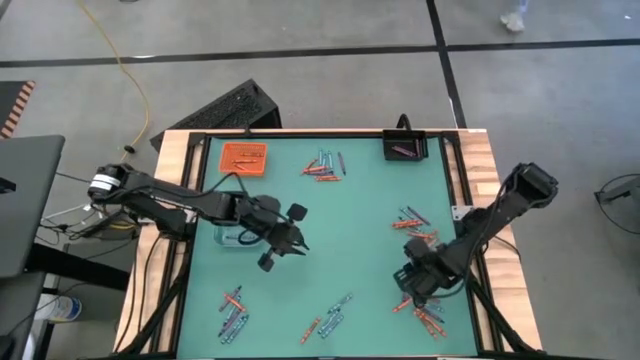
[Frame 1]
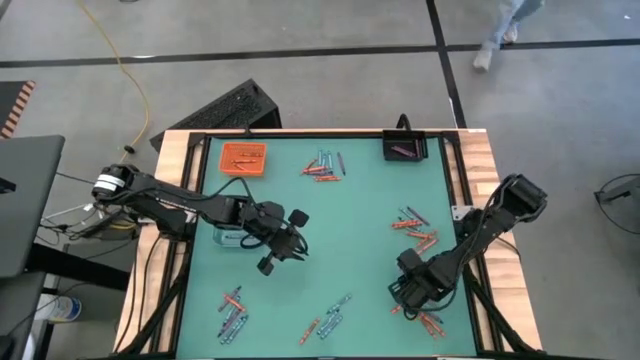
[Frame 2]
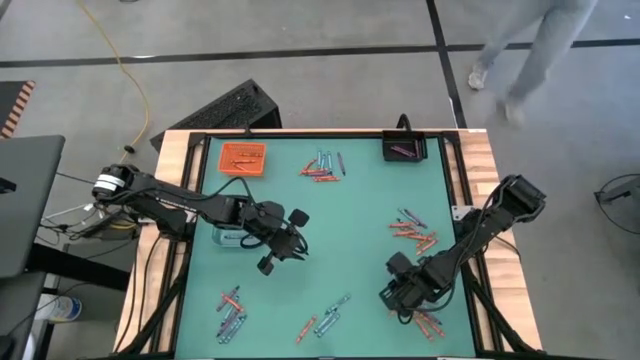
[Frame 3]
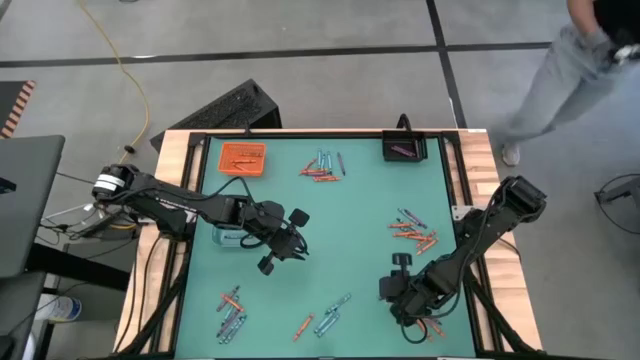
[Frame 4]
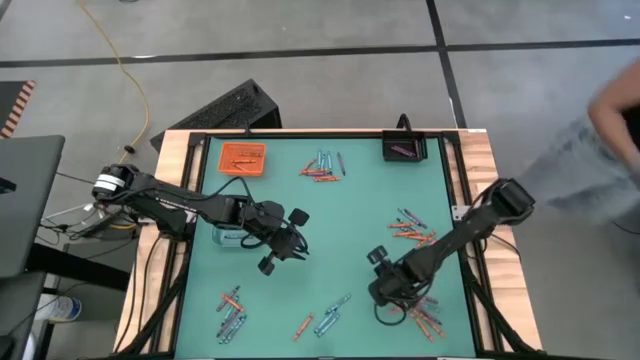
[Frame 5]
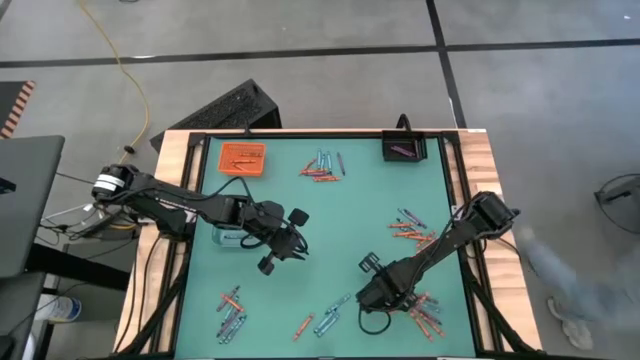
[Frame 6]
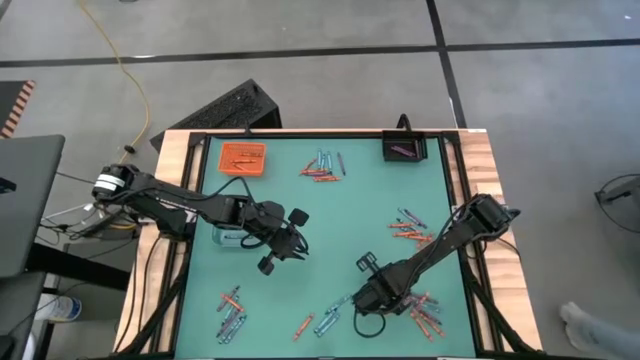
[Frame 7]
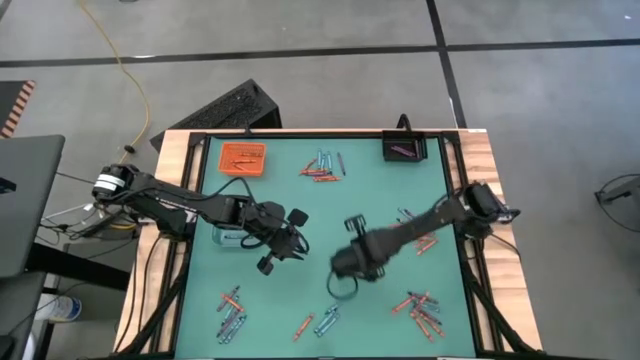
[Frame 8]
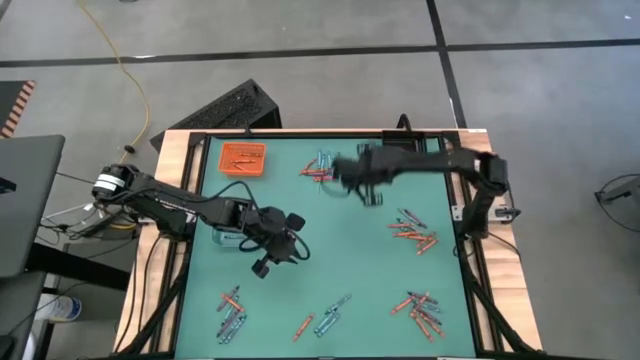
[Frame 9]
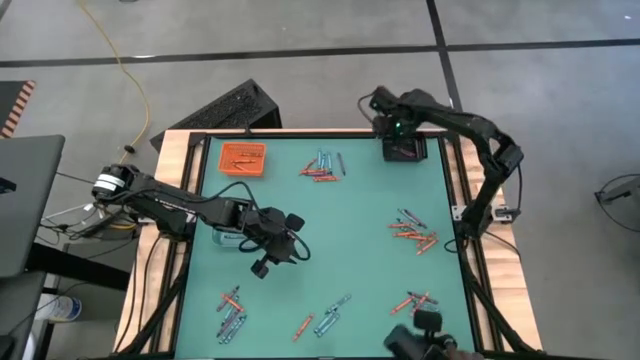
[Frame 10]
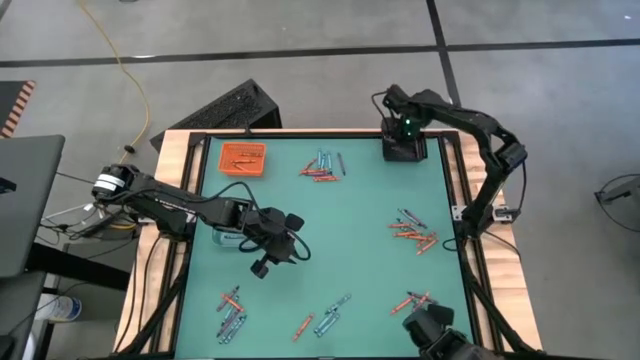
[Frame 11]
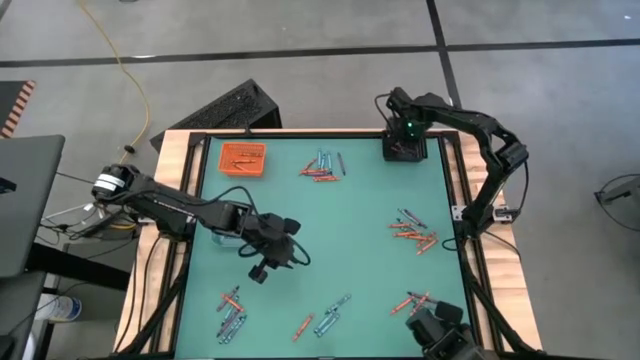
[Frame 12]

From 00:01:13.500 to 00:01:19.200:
Task: Sort crayons
Put the purple crayon into the black basket

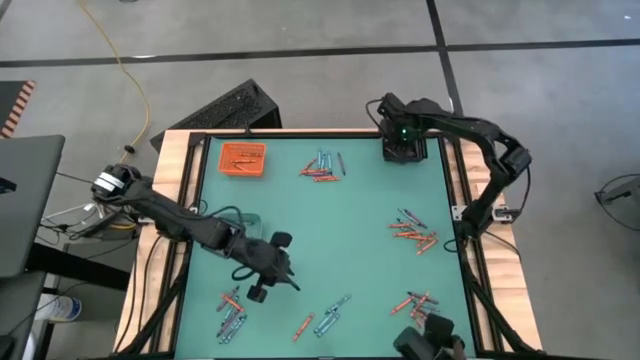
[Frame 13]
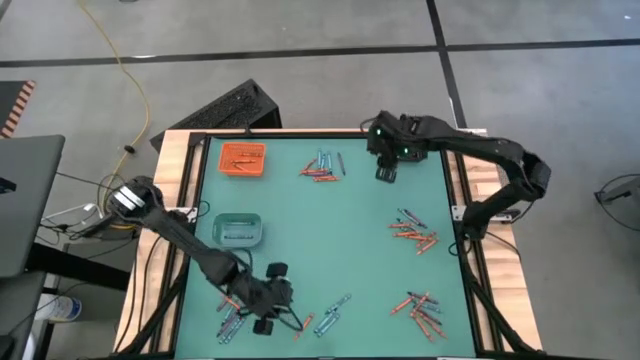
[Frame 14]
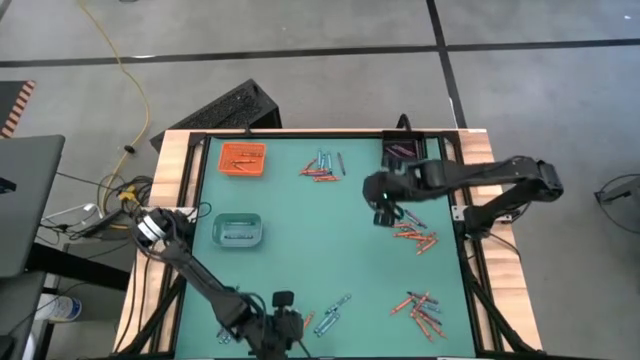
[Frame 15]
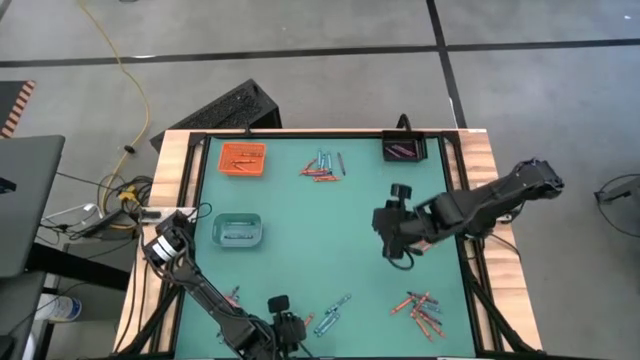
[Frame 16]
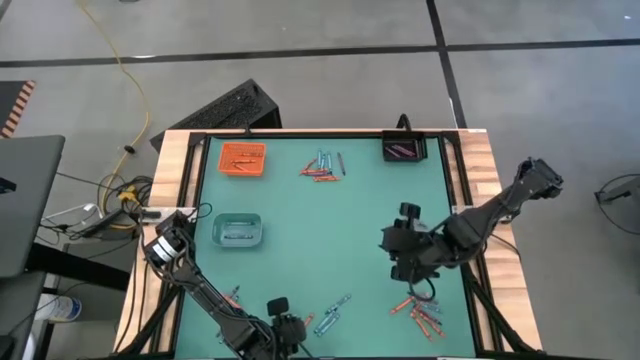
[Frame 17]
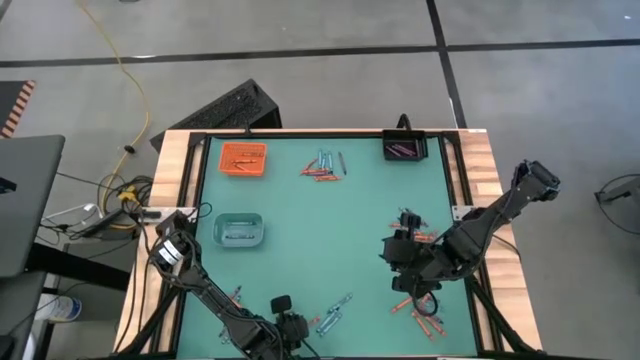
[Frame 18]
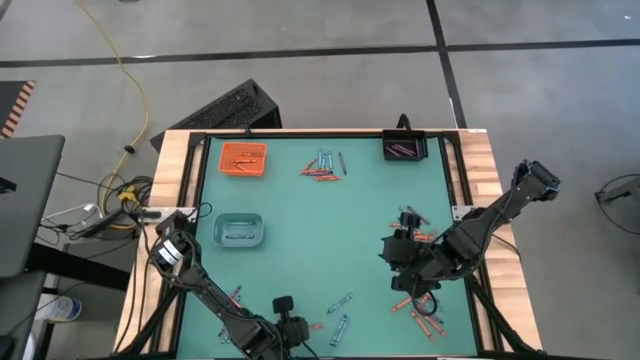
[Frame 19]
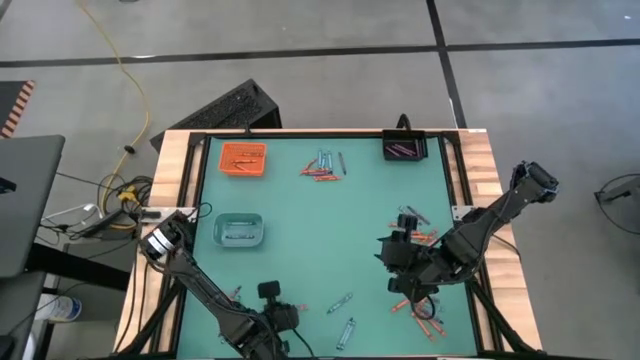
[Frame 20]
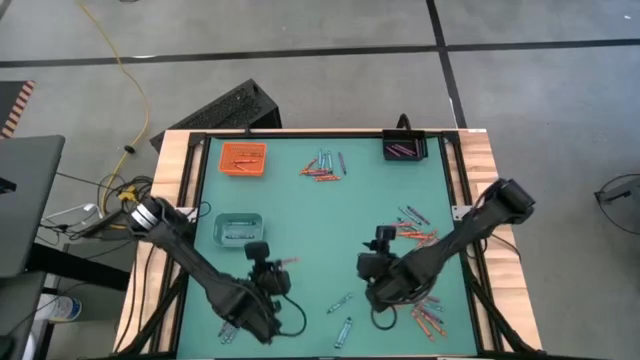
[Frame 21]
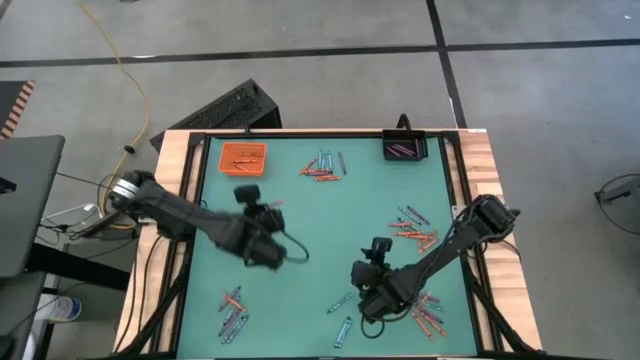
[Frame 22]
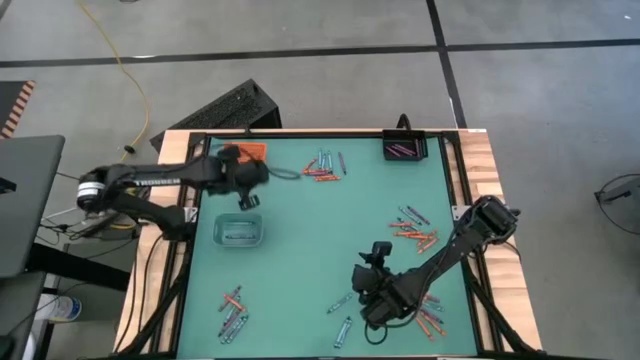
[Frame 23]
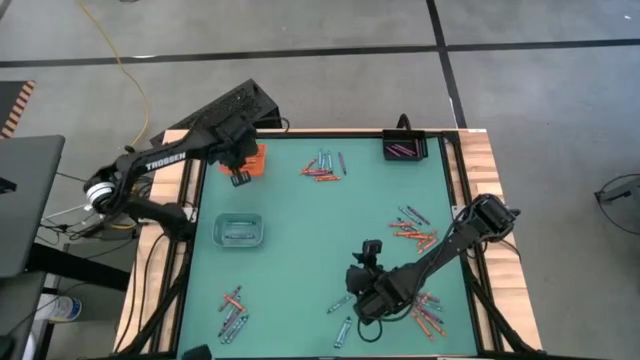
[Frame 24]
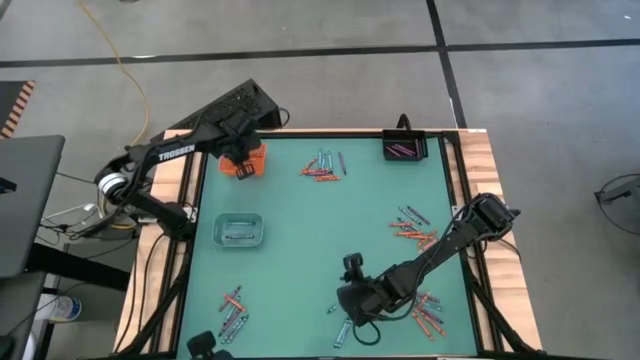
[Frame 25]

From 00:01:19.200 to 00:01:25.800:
Put the orange crayon into the orange basket

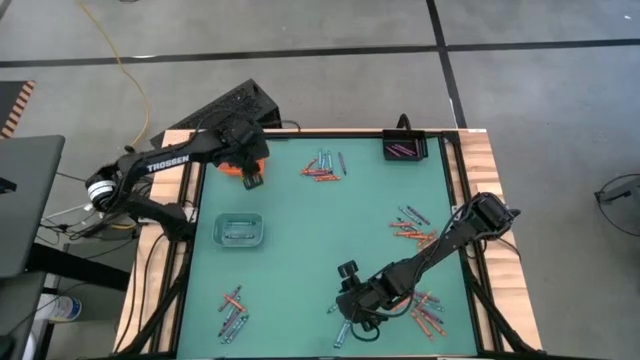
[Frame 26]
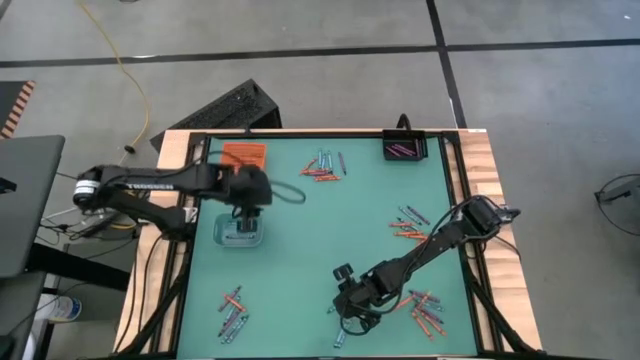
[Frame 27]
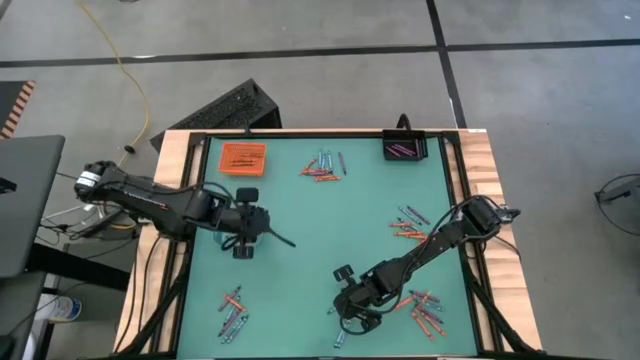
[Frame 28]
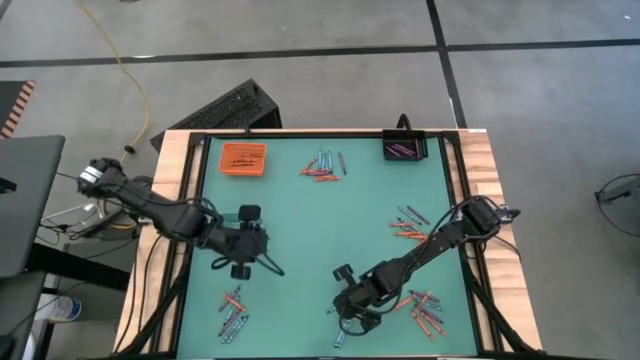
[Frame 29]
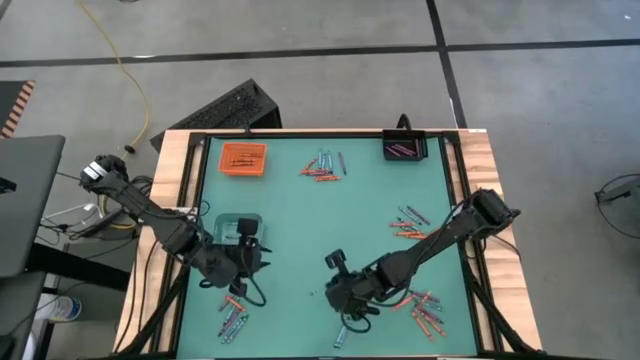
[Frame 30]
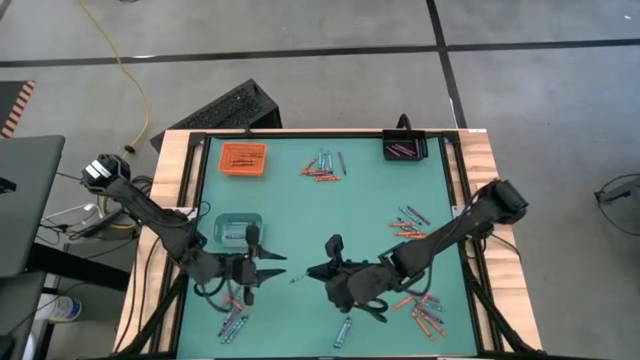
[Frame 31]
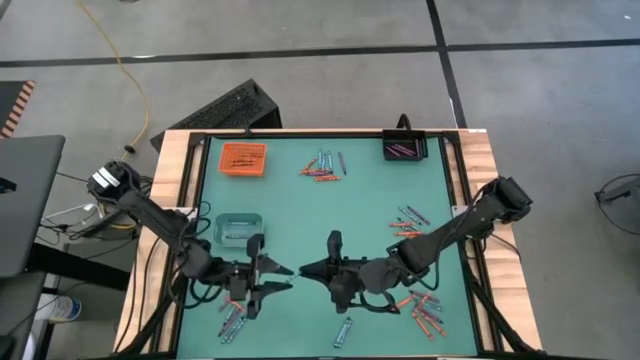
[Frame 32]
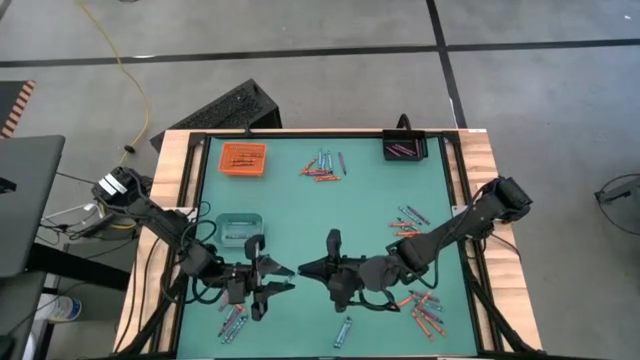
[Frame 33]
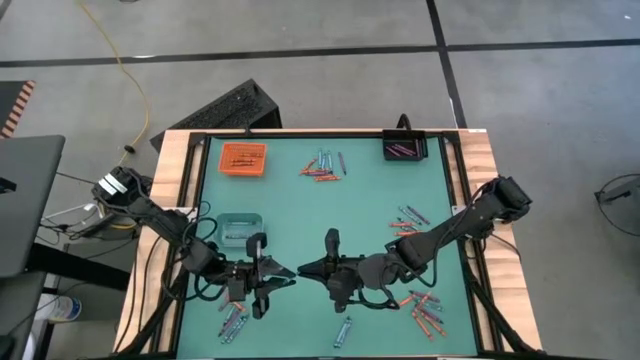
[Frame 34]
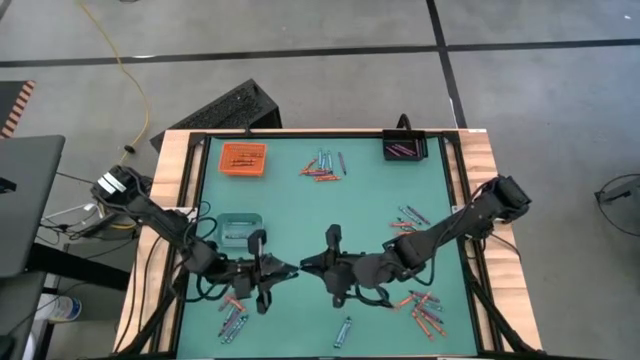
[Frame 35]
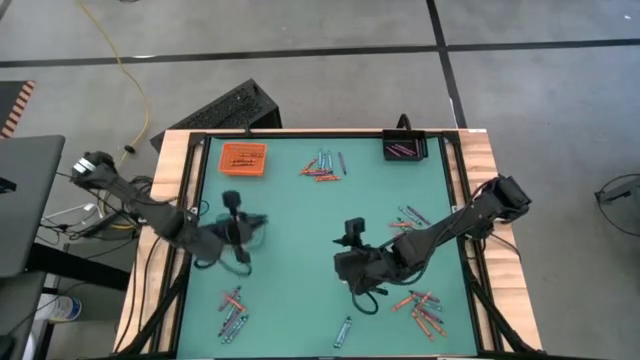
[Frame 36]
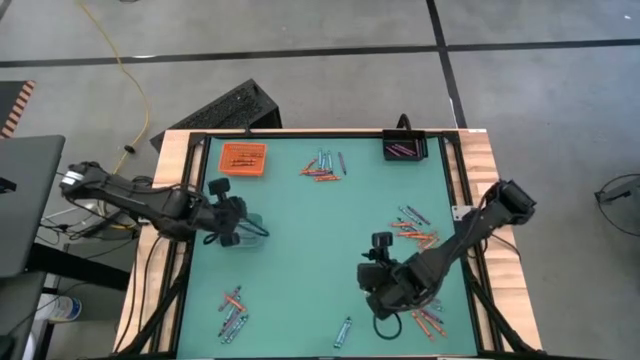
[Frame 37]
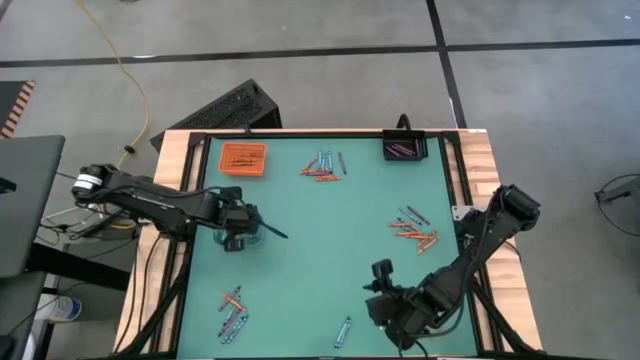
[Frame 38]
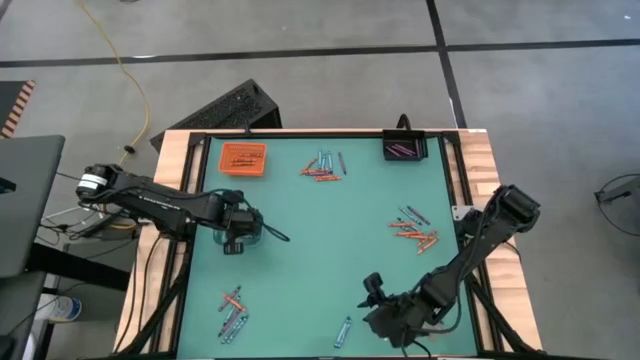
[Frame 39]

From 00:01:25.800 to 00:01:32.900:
Put the blue crayon into the left blue bin

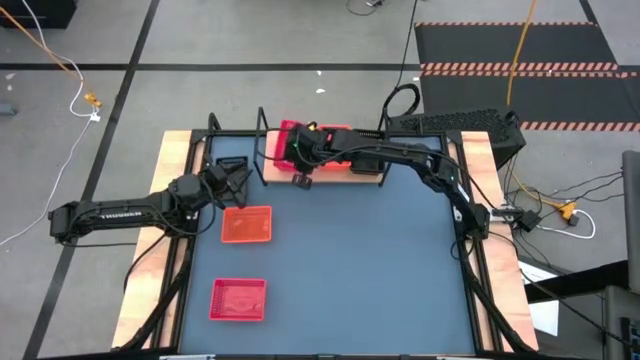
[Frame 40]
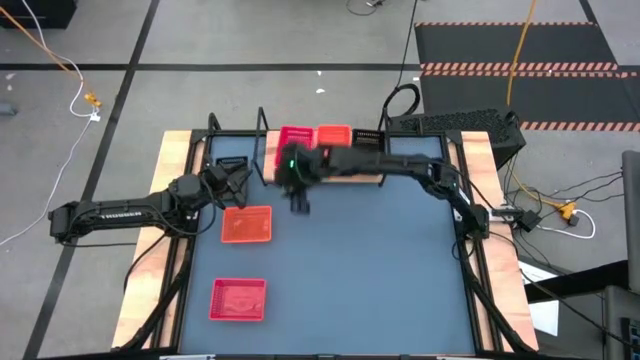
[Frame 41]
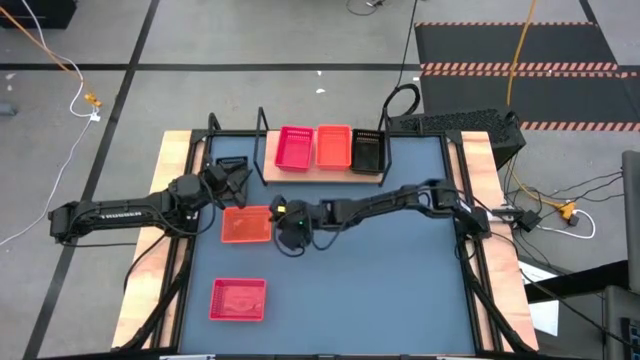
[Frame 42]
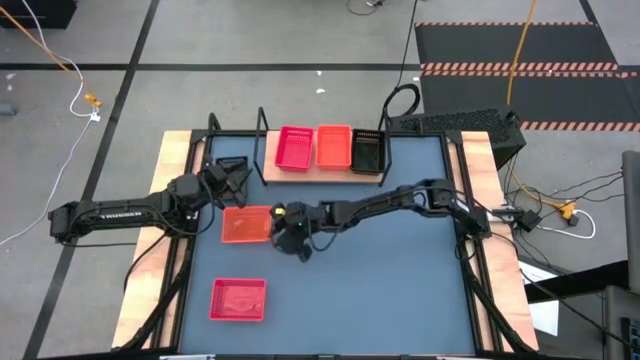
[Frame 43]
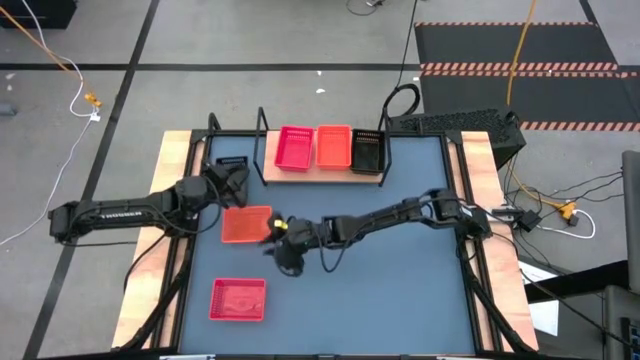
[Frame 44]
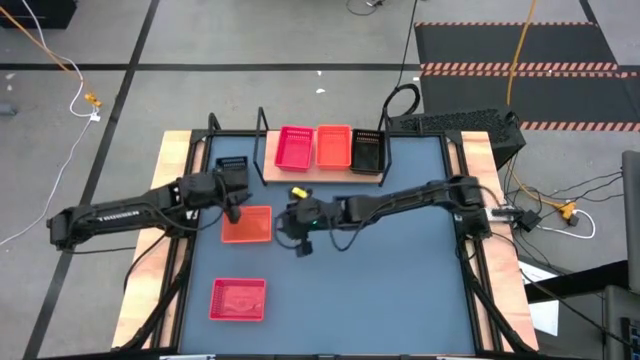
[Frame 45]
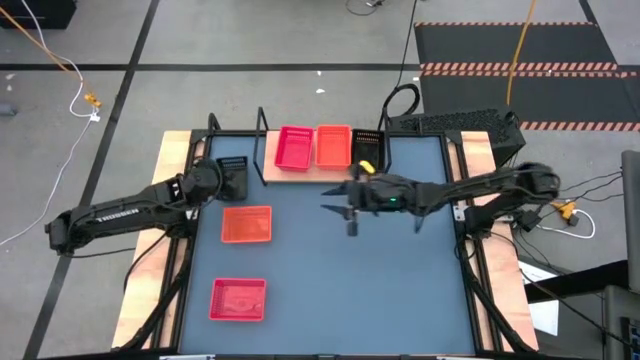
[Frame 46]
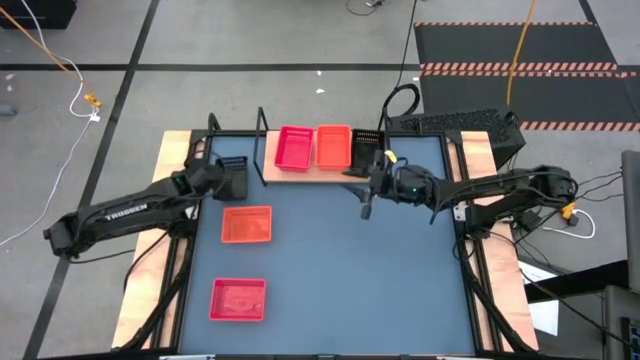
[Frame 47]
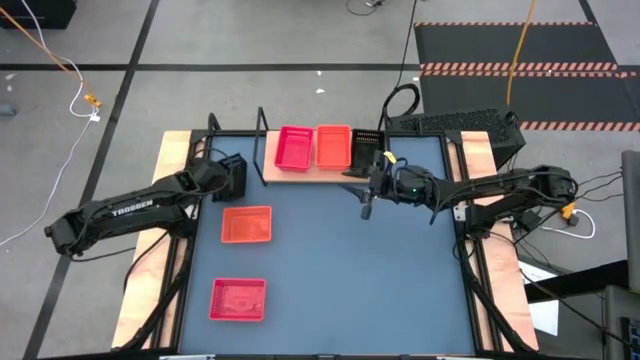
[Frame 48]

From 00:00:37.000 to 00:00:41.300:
Task: Stack baskets on shelf by color
Stack the black bin on the black bin on the shelf
